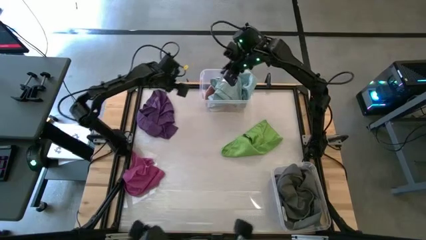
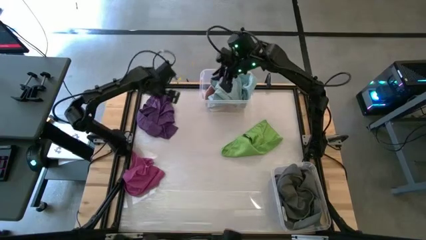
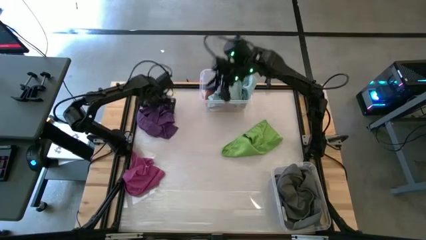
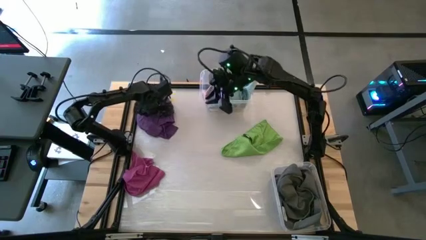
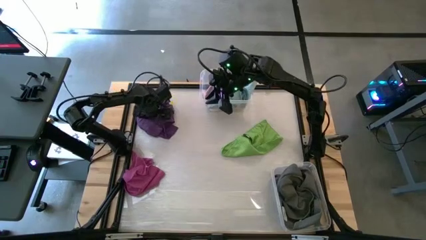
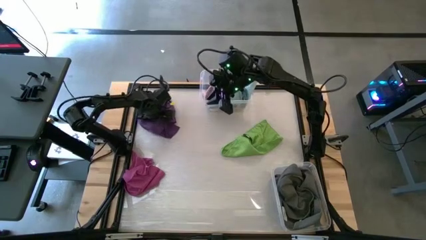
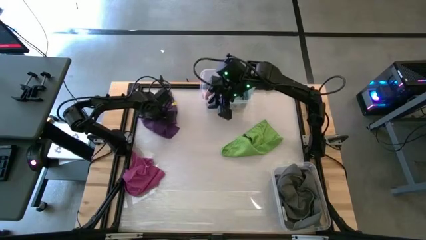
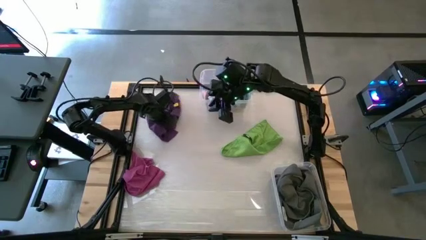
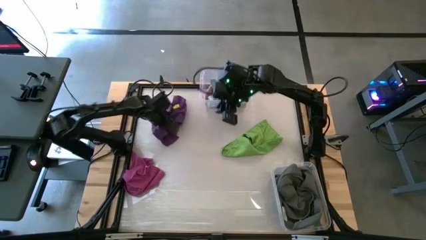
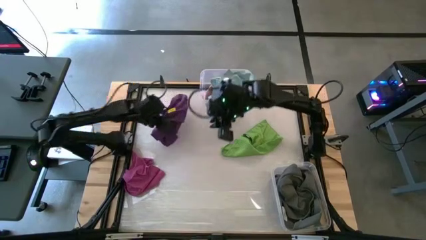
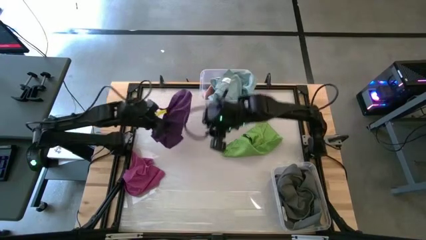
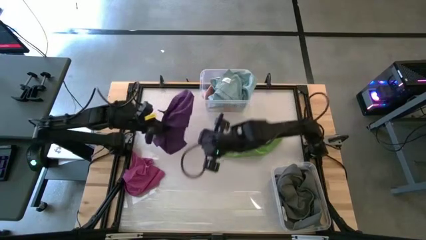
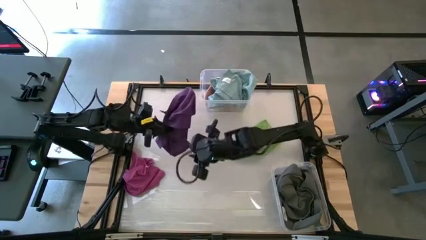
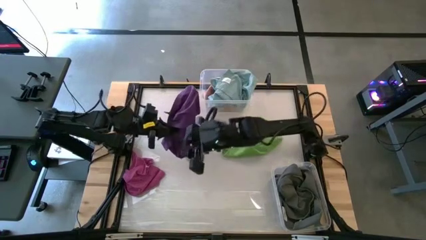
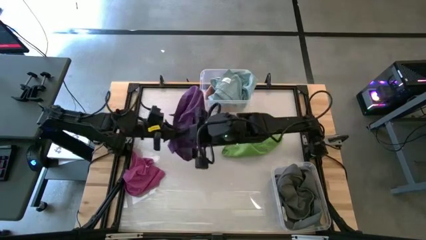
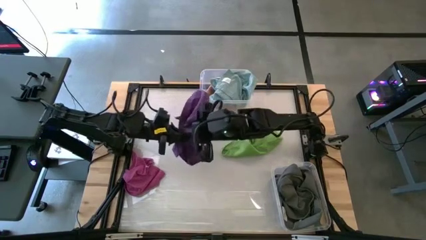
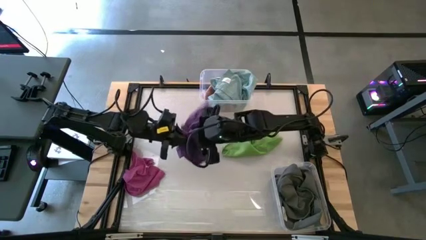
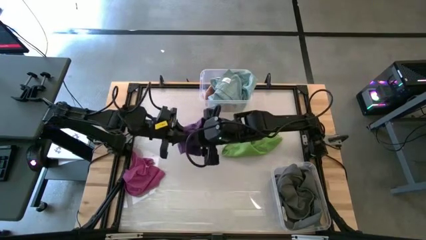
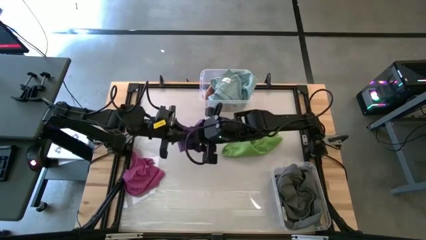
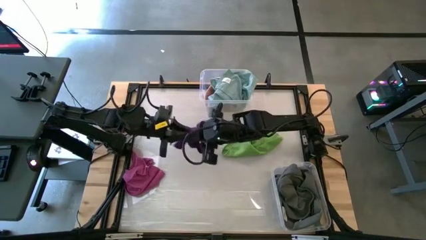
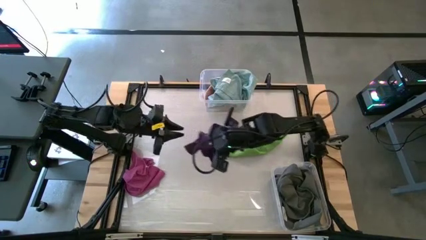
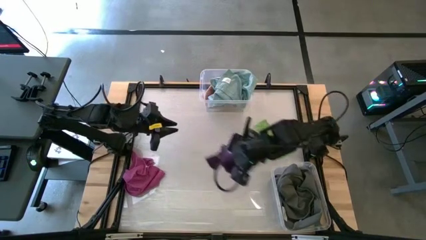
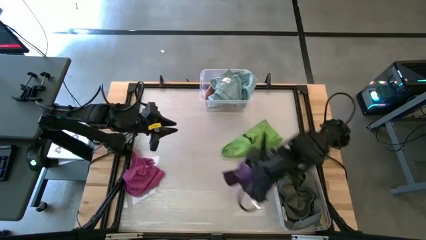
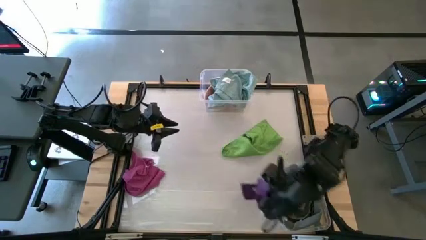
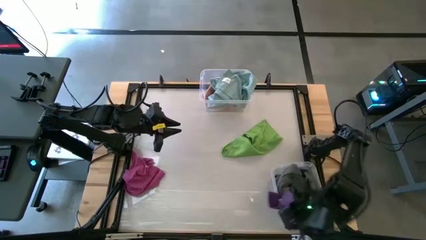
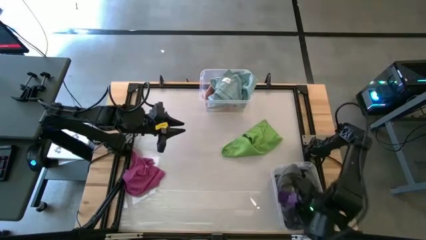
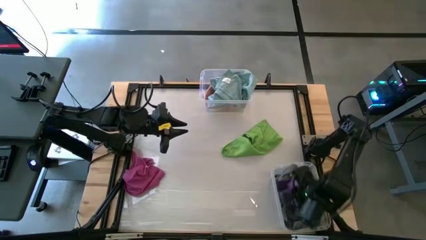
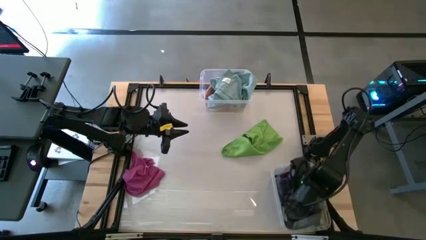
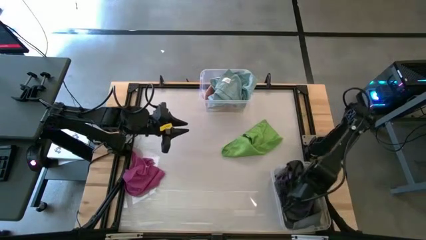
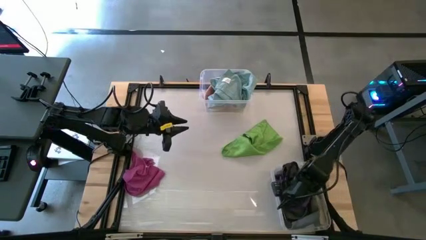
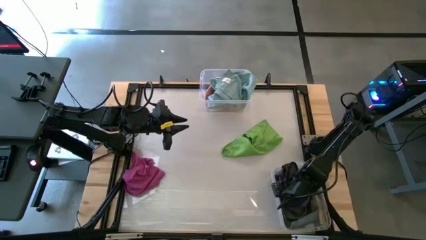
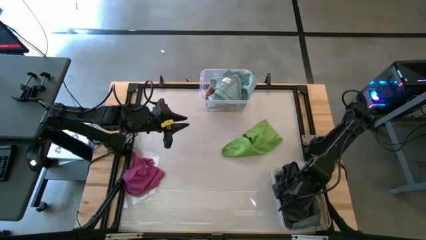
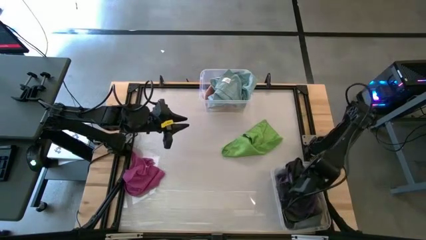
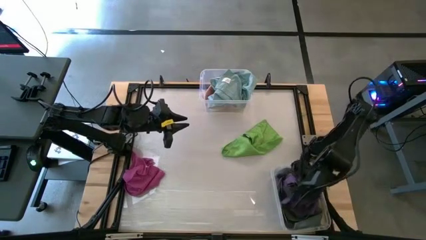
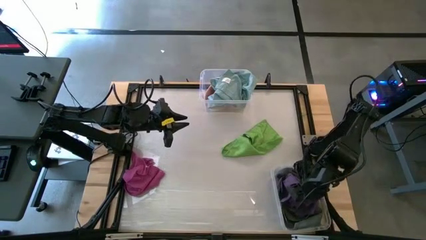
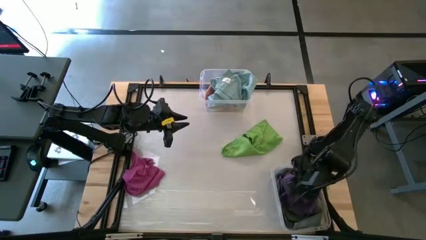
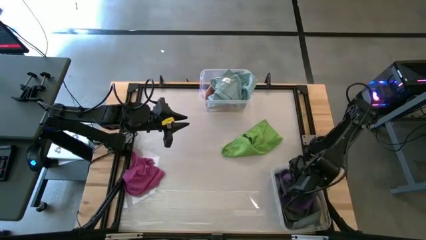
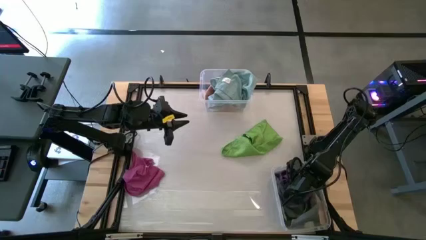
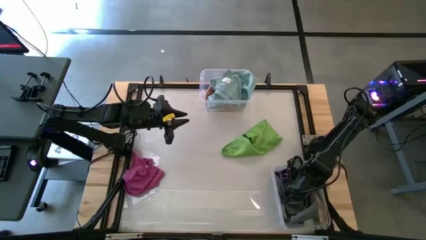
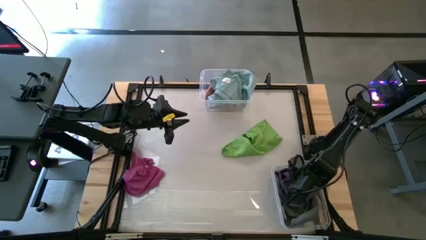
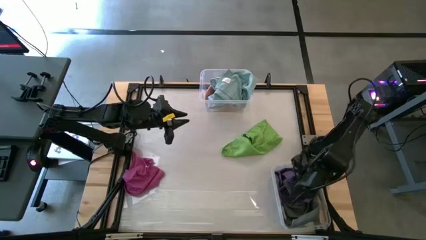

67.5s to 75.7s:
Task: Sort towels by color in basket
Put the violet towel into the bottom transparent bin

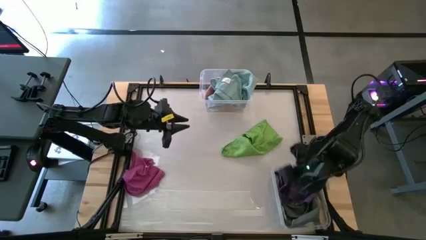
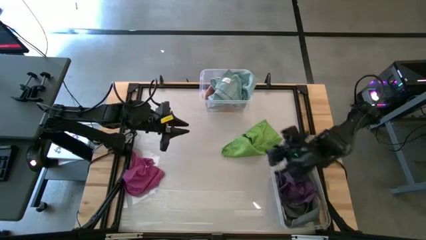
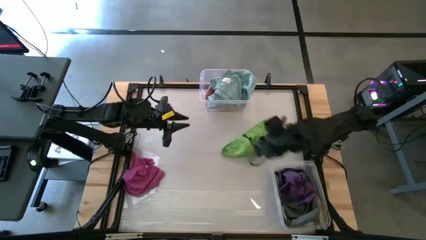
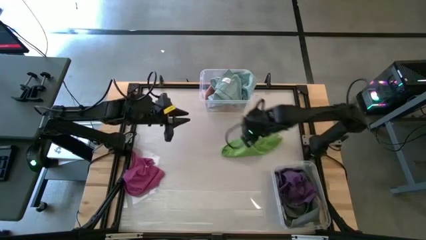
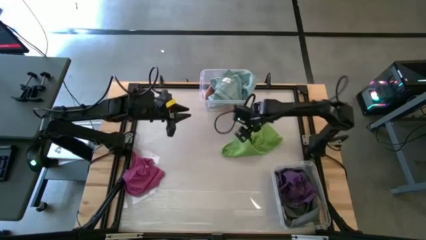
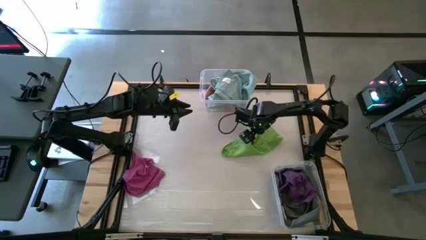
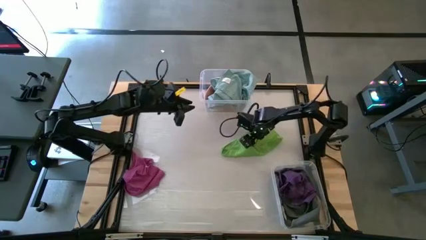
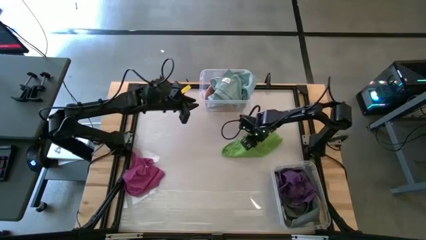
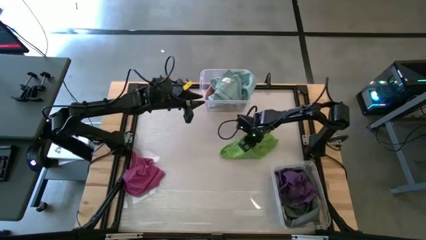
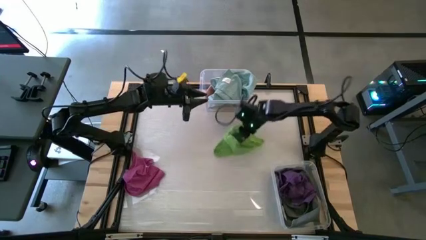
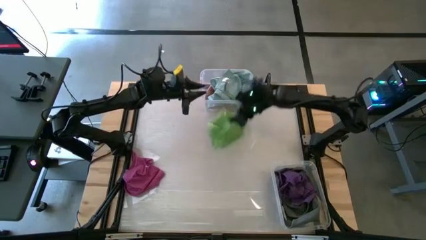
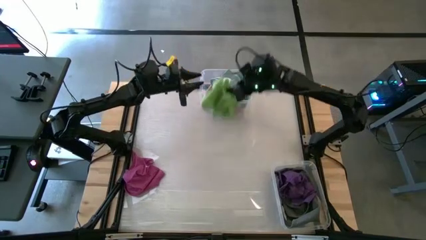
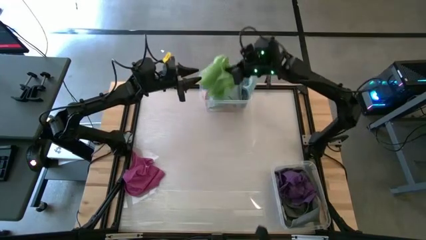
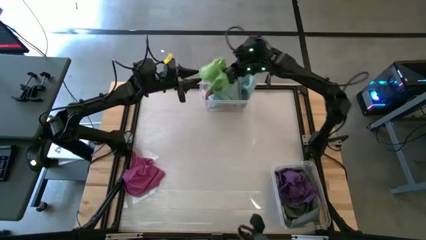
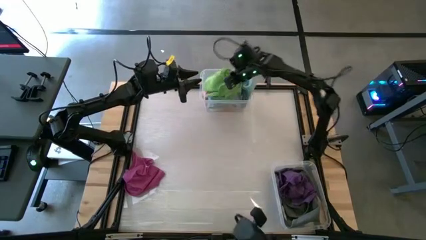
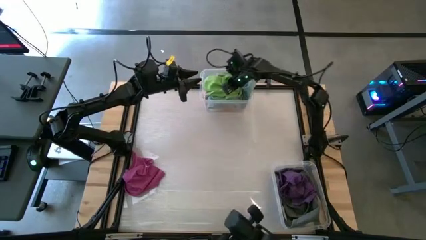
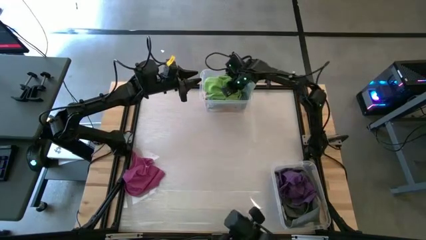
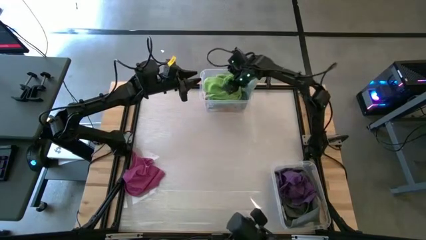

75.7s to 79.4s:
Put the light green towel into the top transparent bin

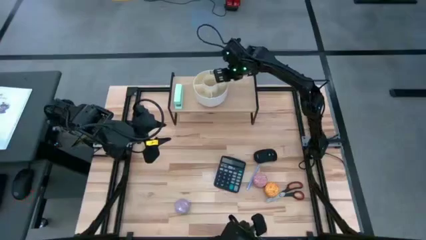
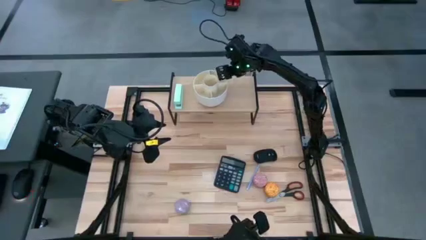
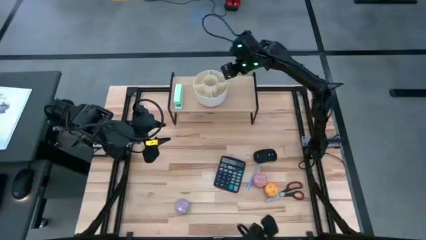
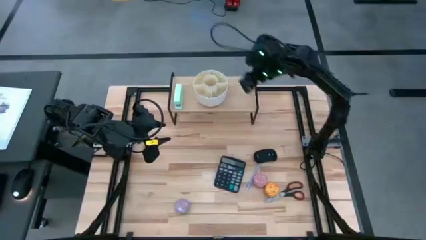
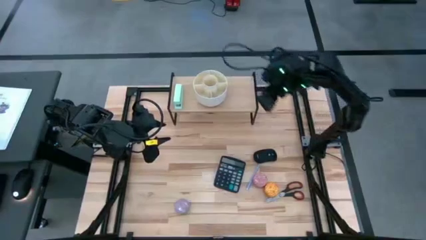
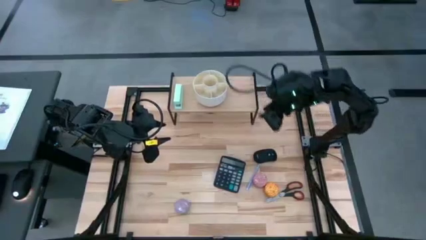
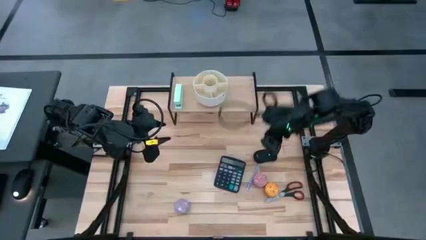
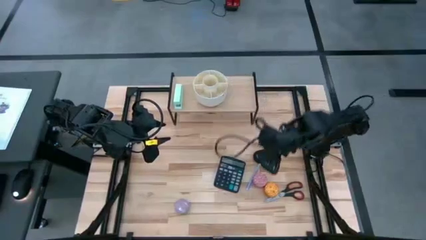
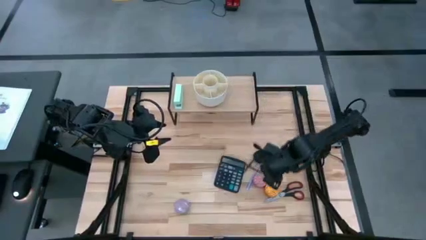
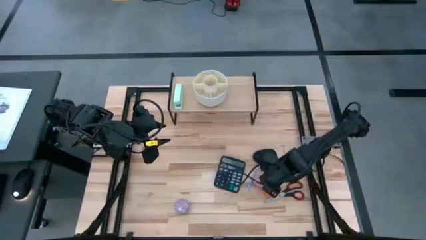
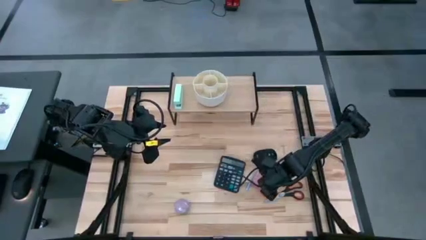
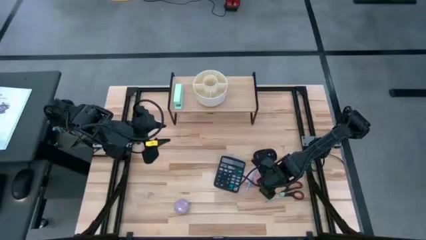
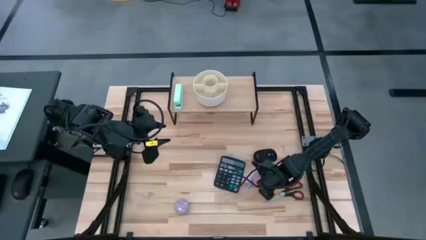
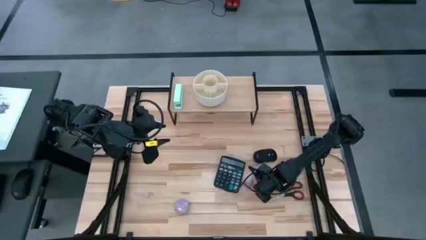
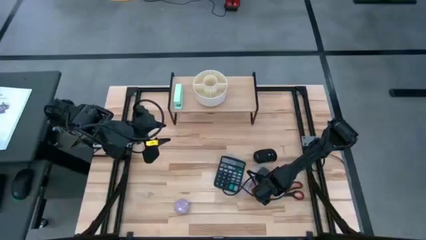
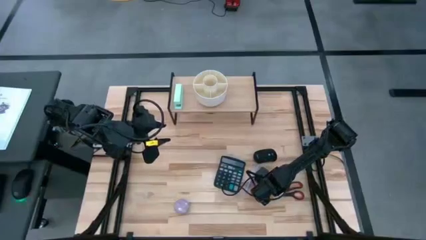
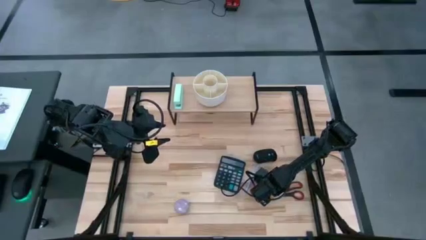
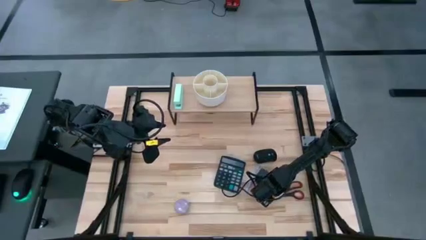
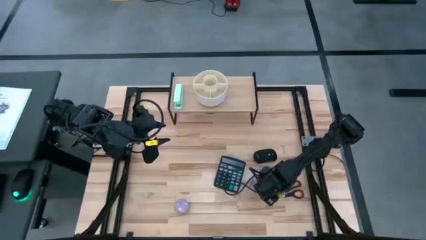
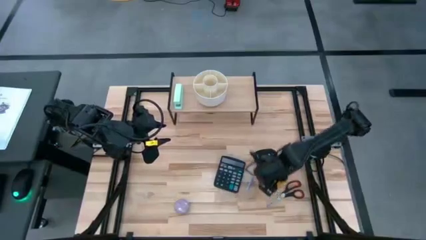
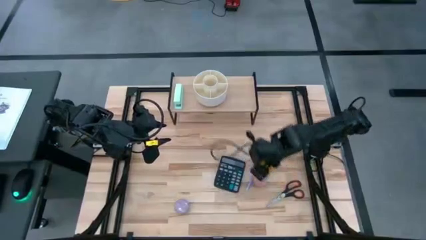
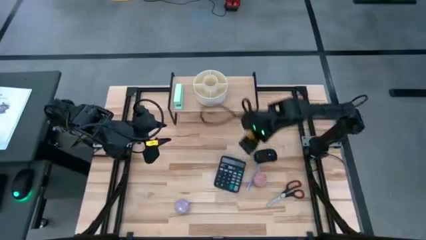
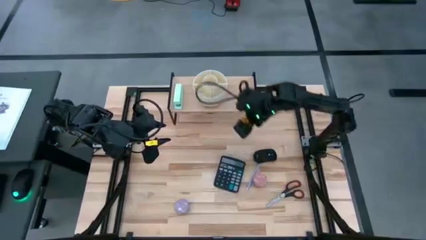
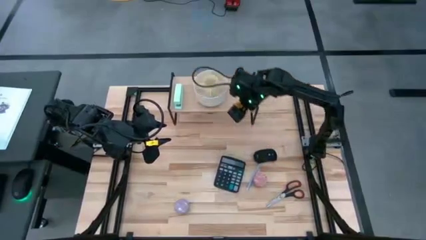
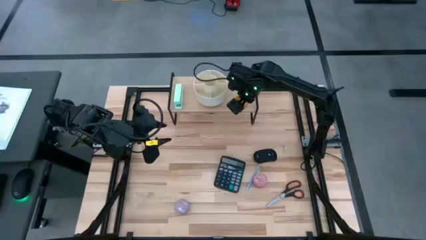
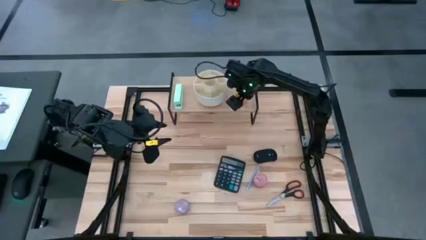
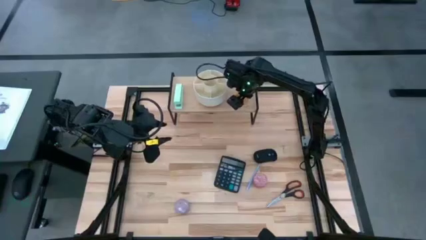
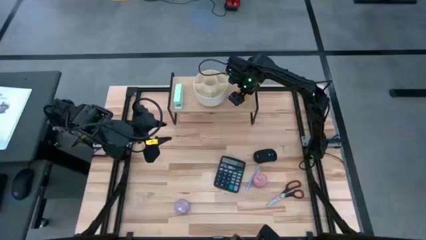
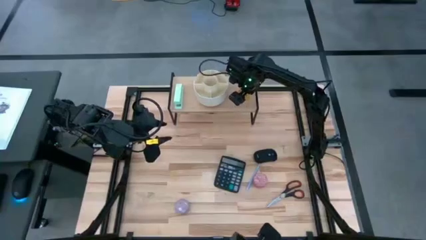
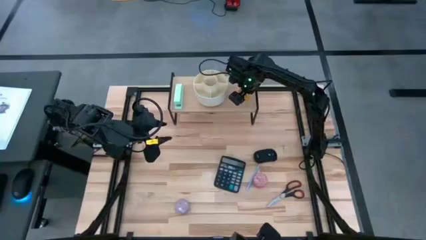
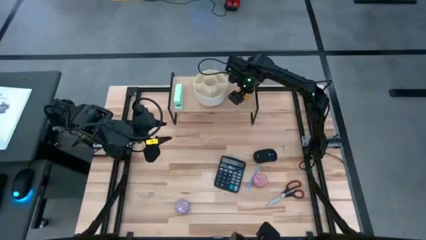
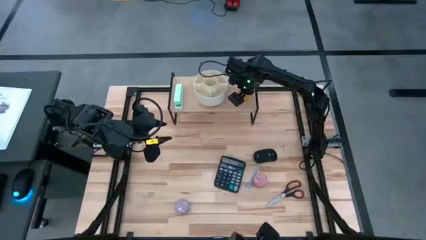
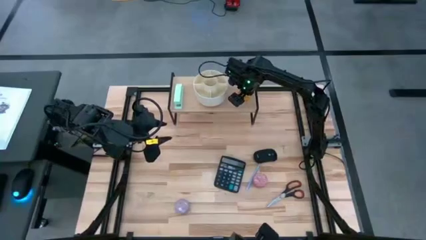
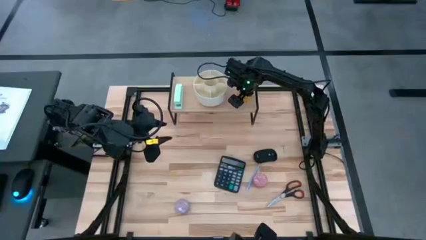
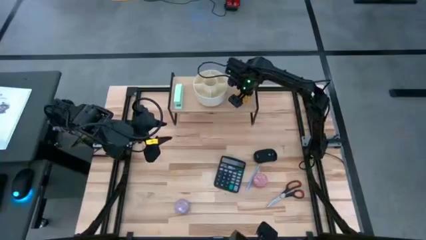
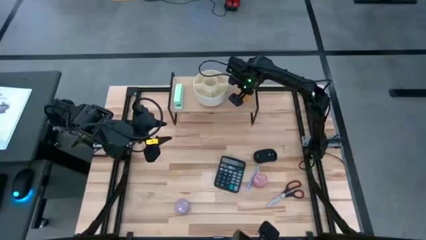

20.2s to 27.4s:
Task: Stock shelves
Put the orange scented candle on the shelf
